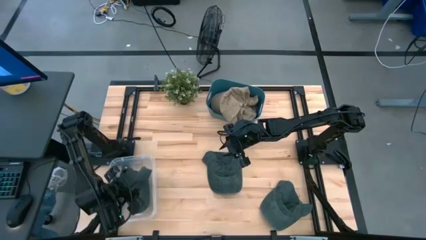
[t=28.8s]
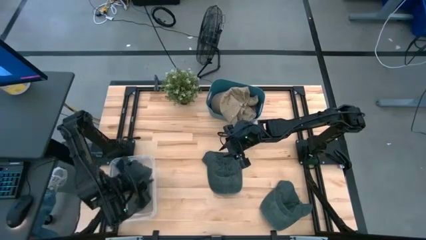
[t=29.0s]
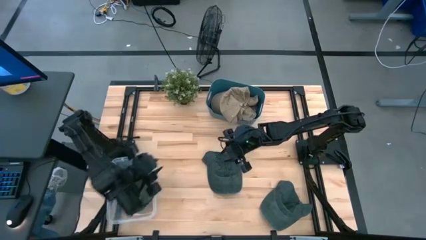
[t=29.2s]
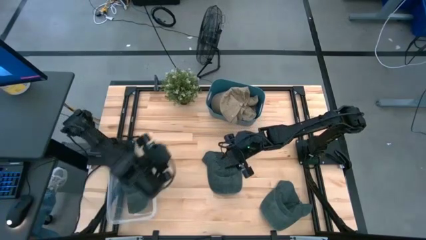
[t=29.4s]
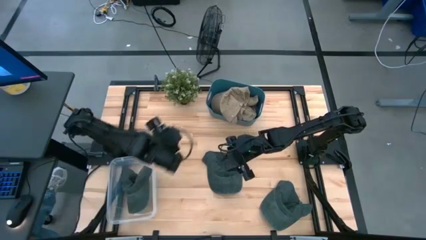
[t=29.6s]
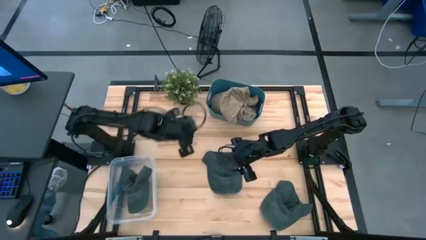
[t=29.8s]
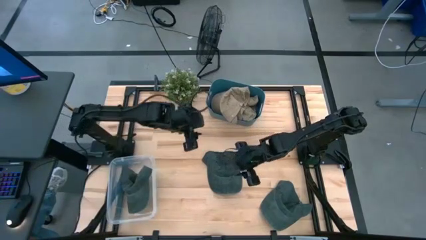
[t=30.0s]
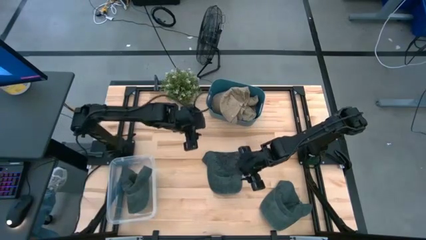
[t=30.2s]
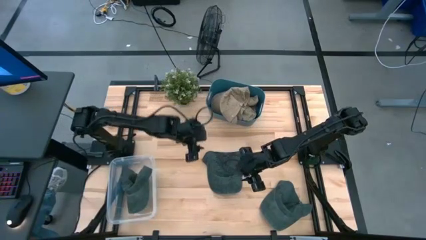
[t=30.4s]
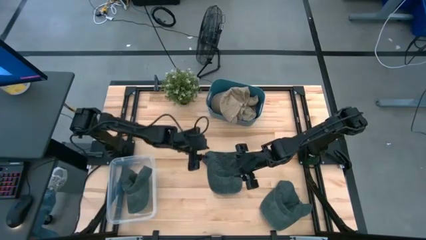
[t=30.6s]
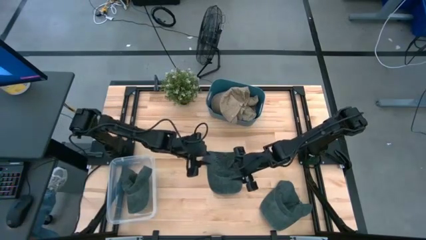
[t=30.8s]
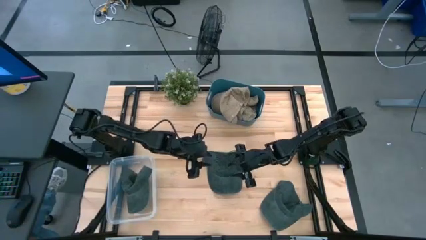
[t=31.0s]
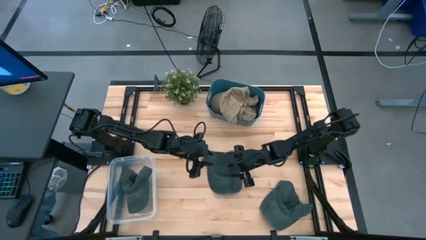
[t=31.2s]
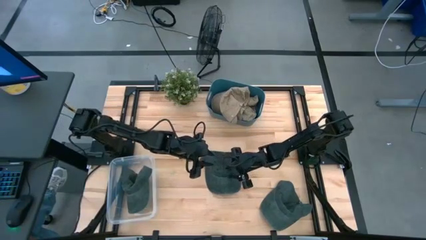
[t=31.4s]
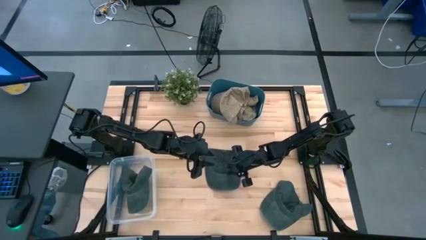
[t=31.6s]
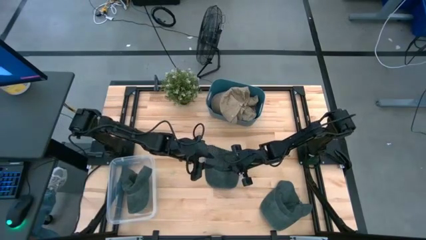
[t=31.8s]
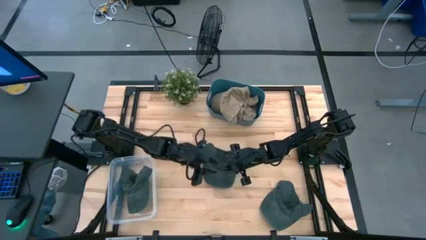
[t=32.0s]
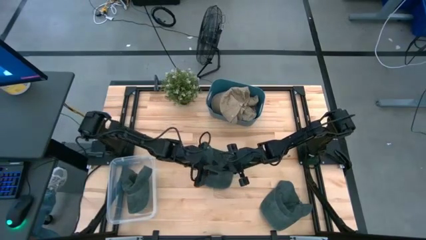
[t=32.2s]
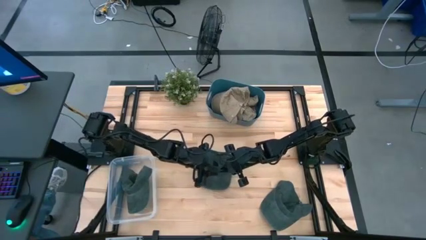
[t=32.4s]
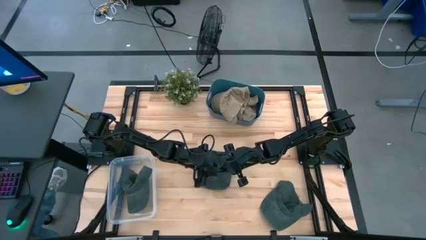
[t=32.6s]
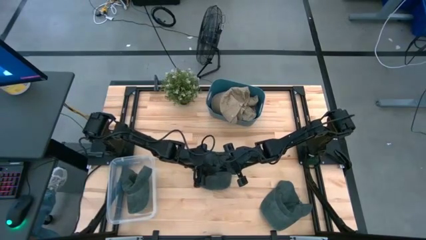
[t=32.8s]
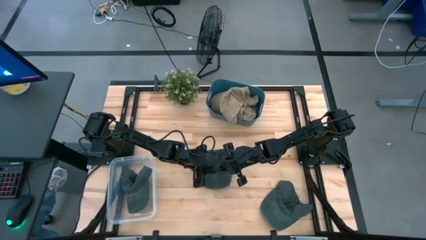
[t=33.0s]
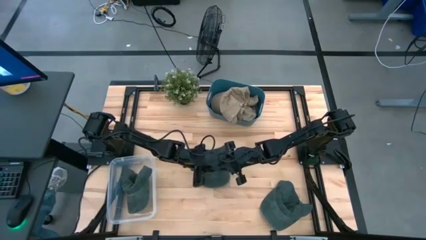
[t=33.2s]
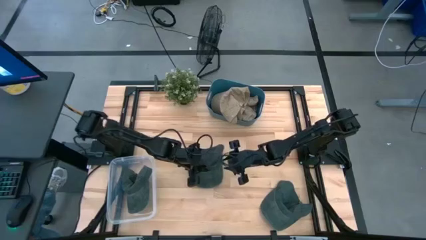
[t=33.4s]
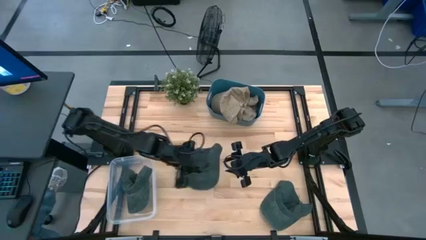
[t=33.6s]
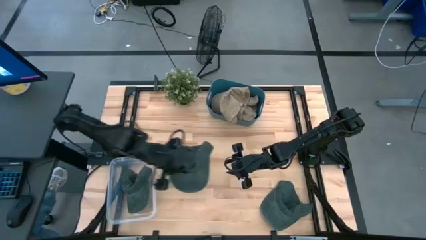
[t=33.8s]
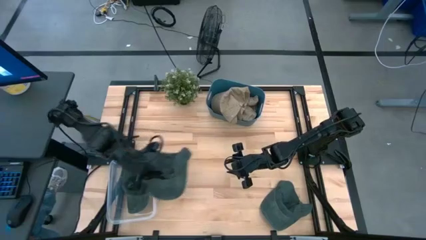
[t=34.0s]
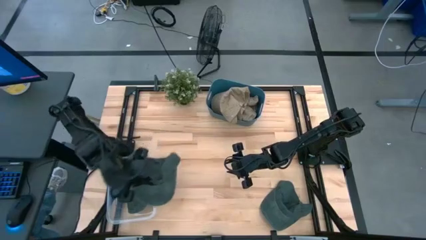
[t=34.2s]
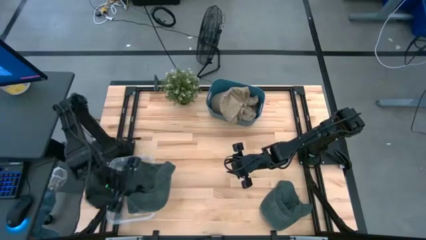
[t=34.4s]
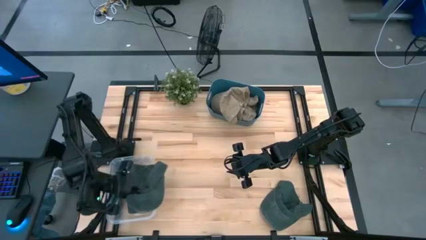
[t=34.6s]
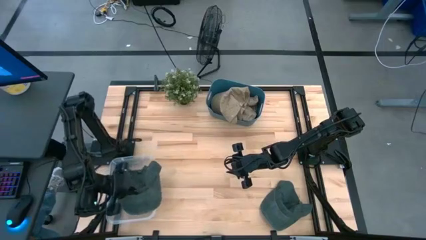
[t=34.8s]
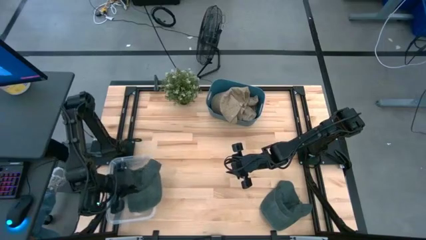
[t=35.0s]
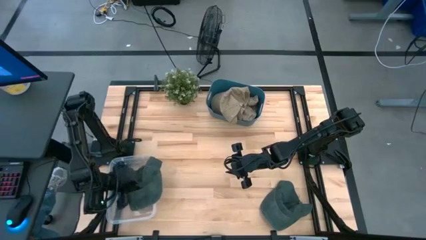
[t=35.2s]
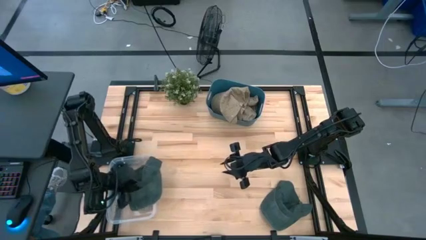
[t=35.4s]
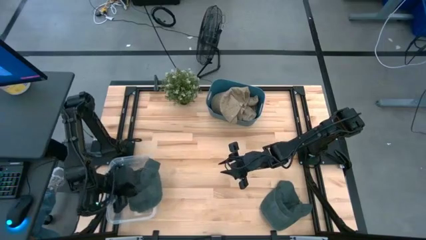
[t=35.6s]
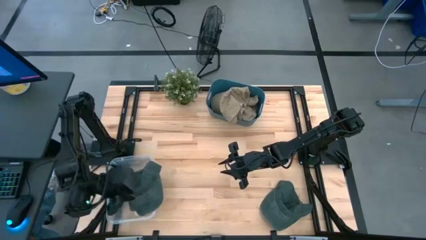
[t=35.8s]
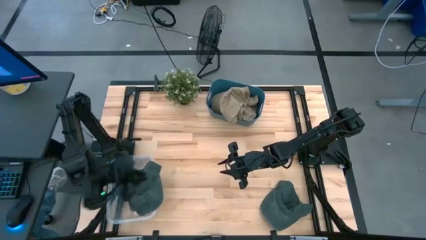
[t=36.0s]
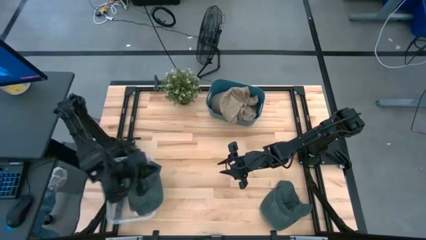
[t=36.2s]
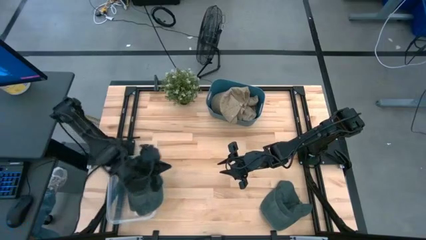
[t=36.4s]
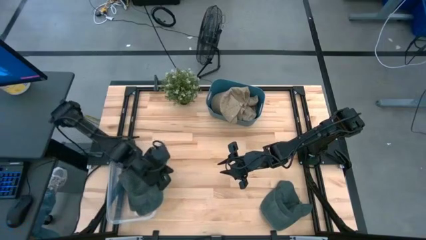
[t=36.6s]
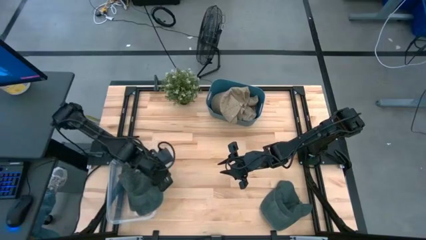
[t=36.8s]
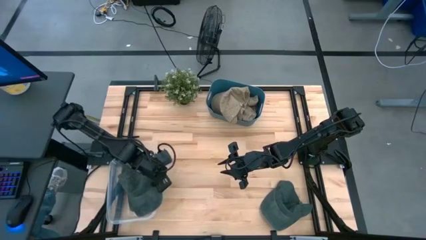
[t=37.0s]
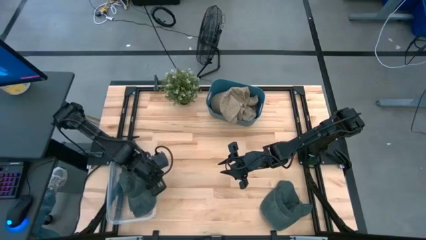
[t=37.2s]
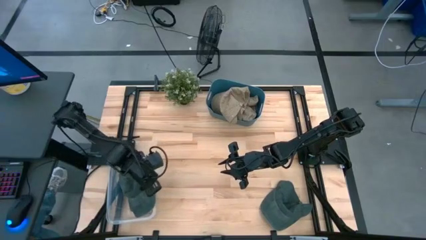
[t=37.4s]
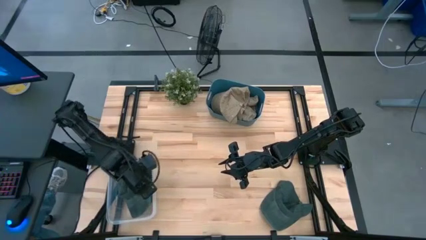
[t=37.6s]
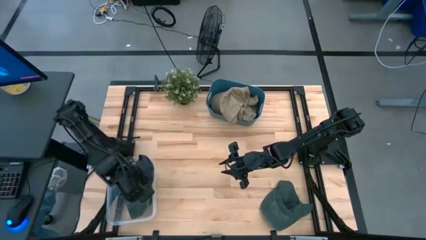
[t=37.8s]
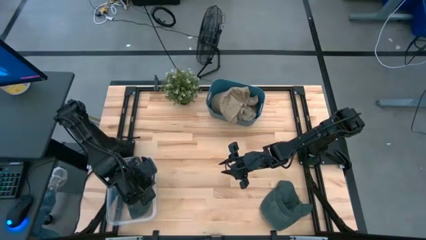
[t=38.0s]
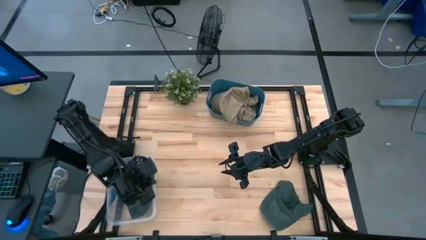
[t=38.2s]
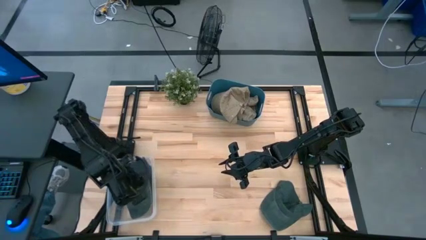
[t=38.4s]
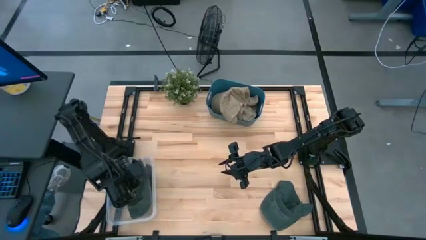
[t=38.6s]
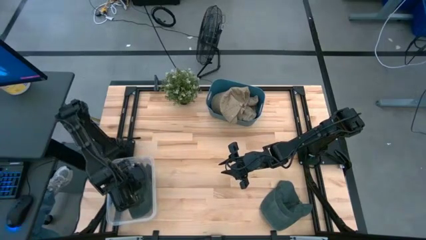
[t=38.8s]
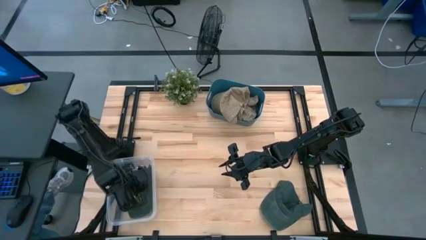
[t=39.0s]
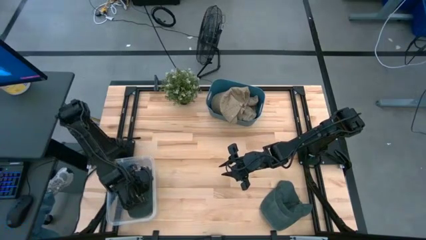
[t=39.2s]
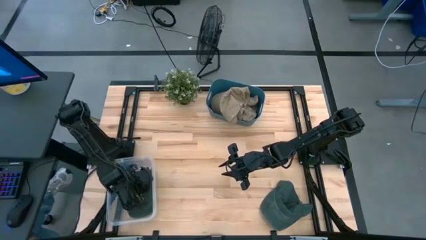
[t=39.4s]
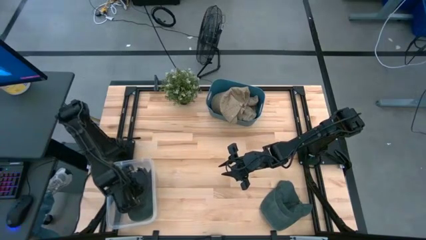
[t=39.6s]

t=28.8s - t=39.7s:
Task: Pick & Place hat
Put the left blue cap into the transparent bin

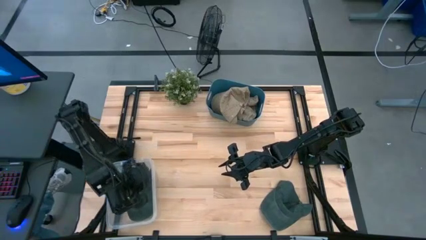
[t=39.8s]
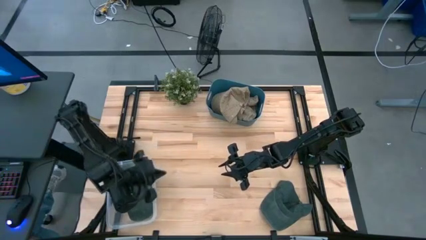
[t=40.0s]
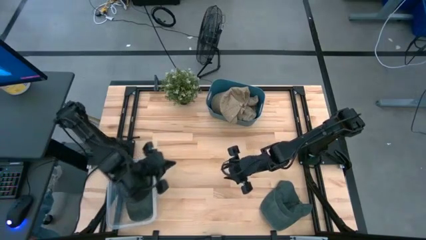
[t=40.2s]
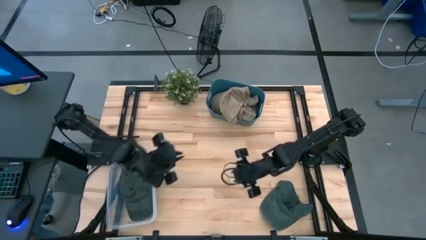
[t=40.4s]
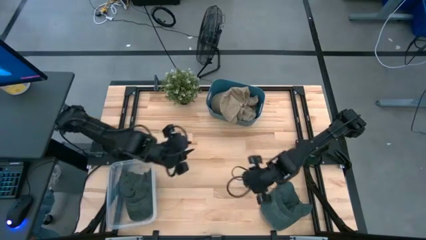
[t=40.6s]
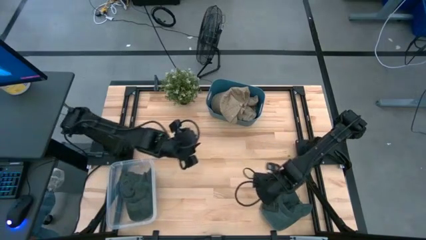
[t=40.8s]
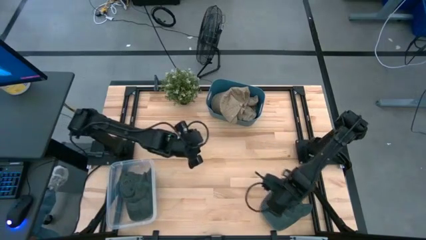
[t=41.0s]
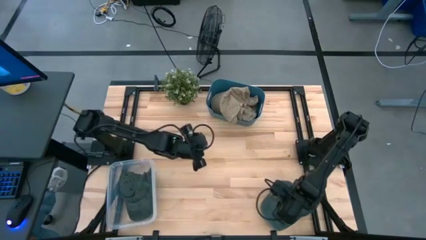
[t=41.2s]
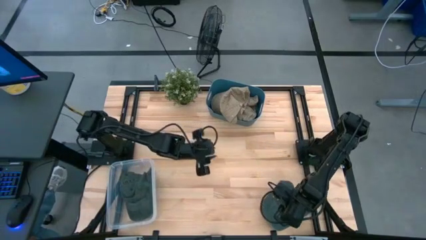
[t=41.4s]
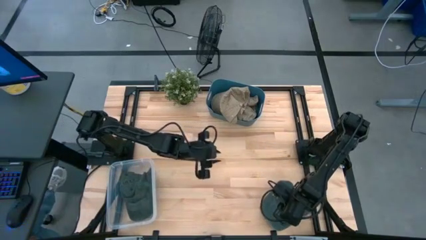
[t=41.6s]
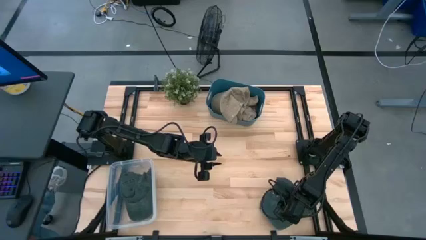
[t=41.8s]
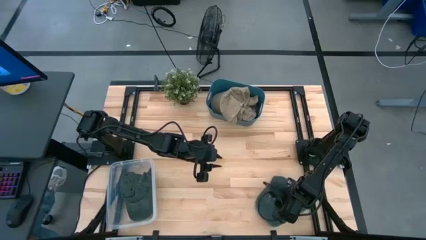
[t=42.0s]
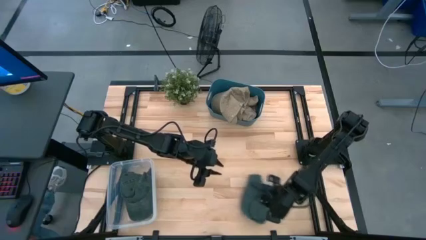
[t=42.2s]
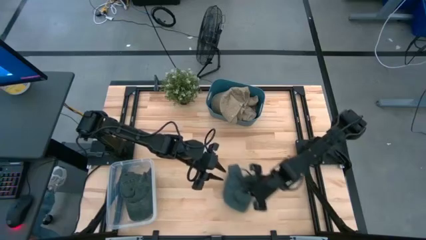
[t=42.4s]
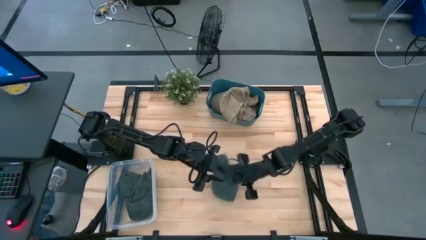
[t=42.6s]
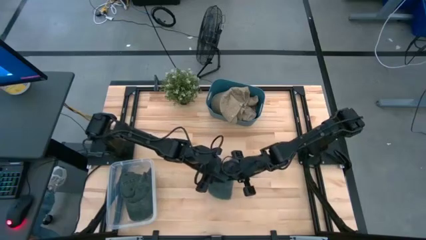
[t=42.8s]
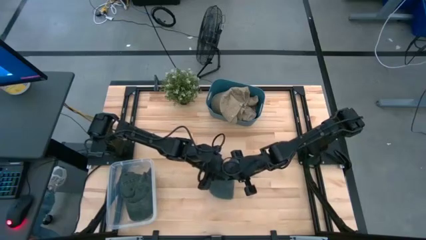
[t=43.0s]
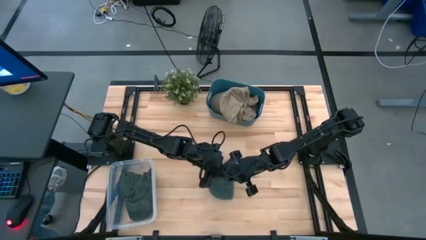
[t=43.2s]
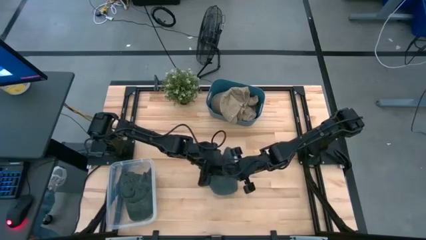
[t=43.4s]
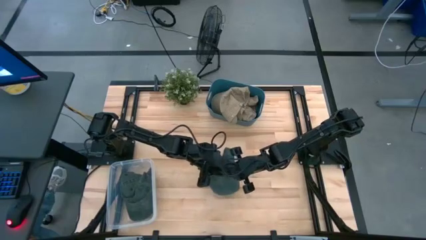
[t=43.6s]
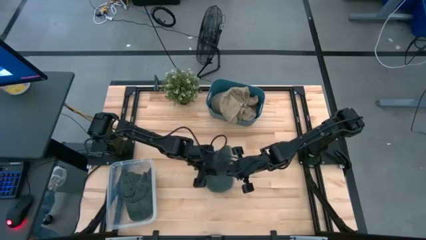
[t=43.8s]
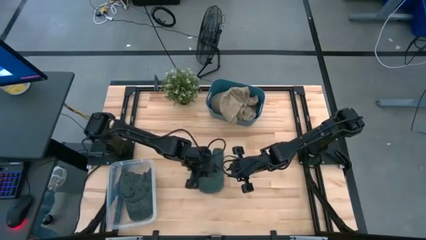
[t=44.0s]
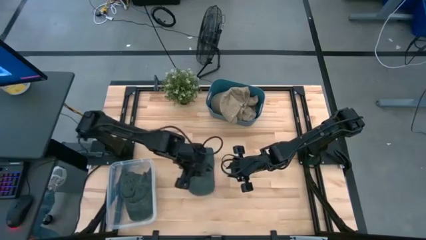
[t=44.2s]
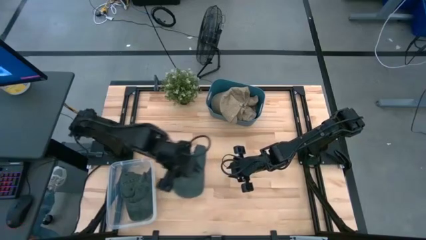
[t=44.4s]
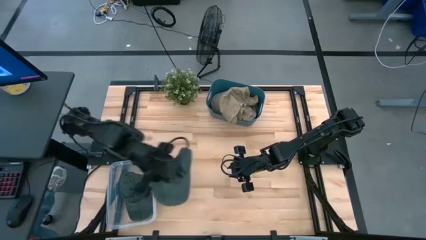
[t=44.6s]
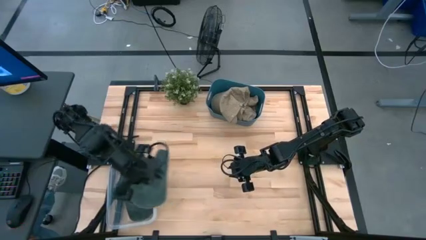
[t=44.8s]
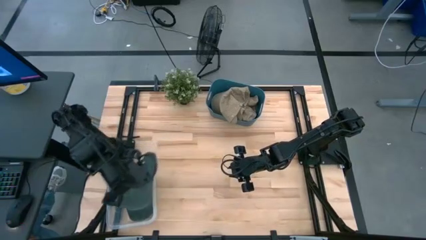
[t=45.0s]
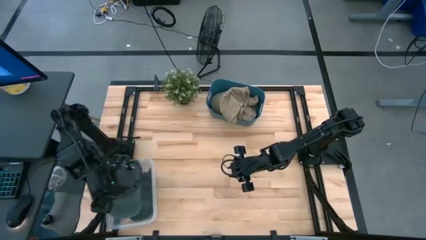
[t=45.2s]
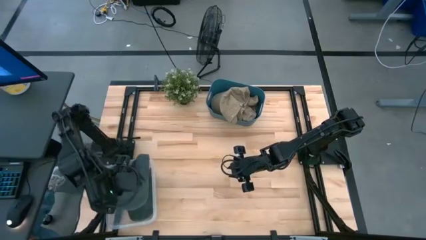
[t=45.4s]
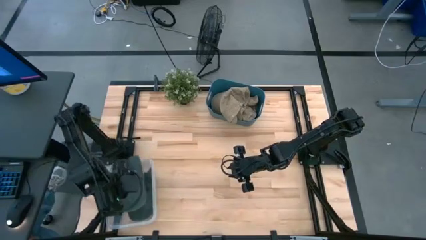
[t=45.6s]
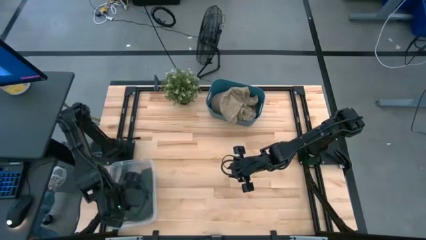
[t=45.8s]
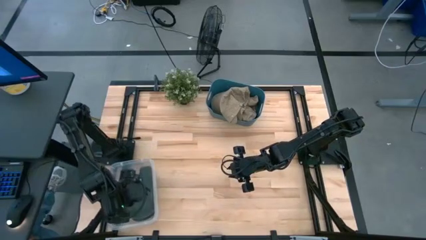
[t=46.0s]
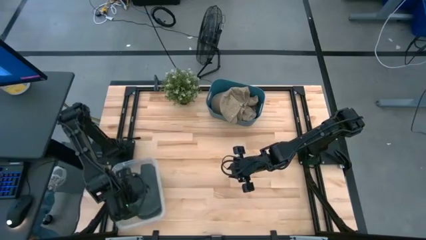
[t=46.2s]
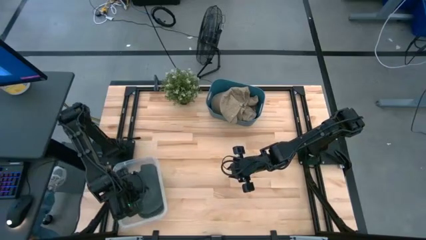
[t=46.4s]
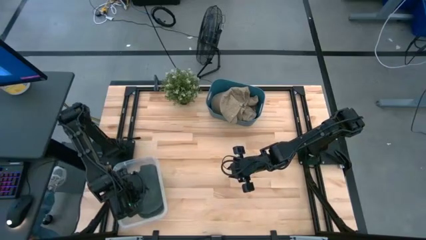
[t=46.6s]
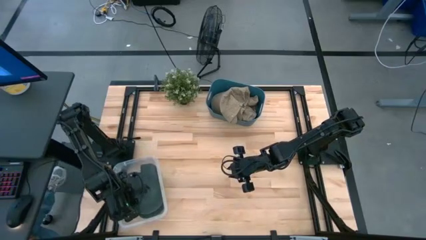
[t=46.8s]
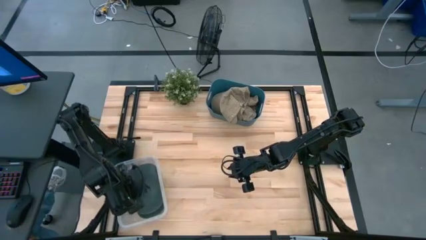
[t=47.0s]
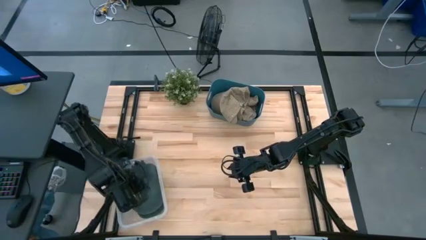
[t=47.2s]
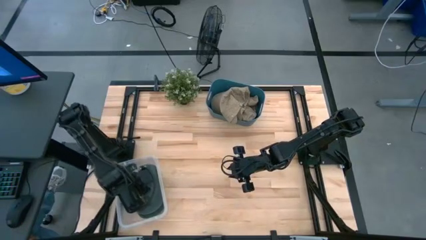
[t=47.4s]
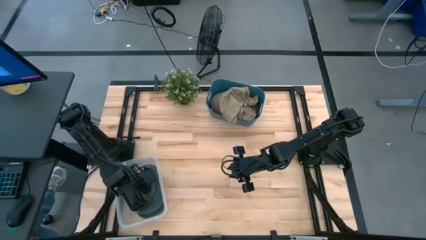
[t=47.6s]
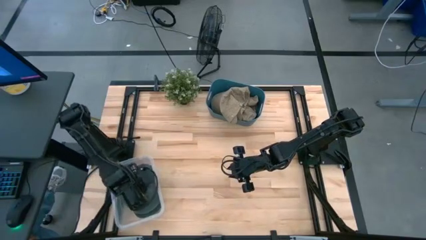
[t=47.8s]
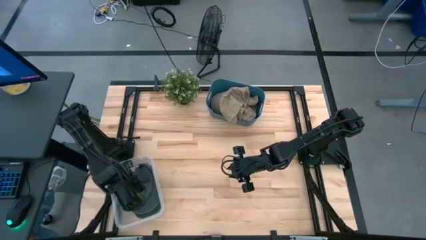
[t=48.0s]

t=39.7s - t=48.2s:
Put the blue cap into the transparent bin
